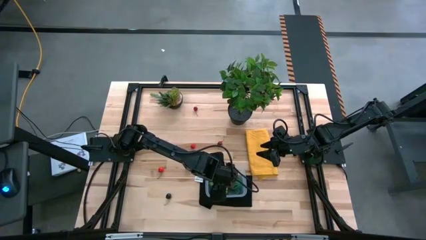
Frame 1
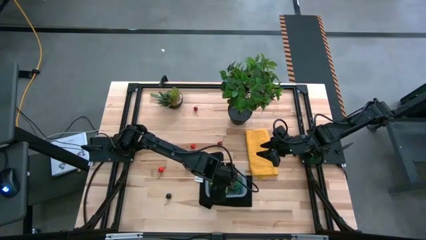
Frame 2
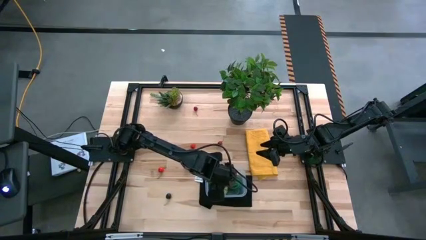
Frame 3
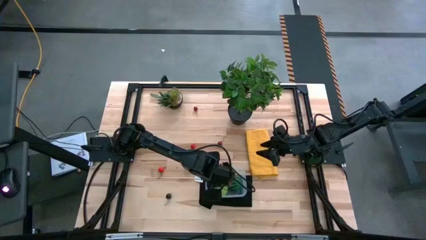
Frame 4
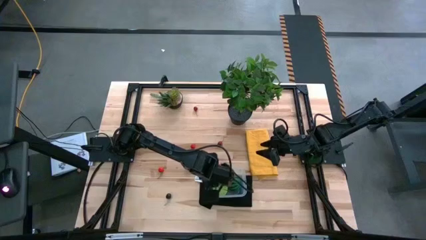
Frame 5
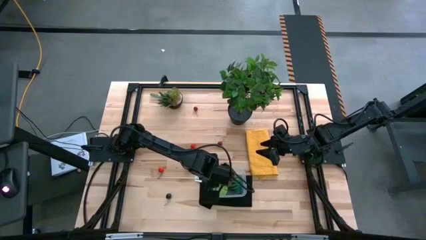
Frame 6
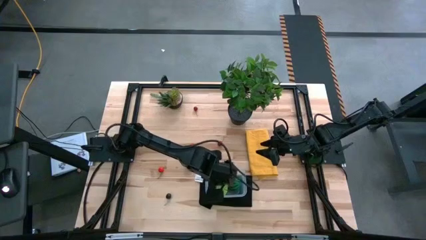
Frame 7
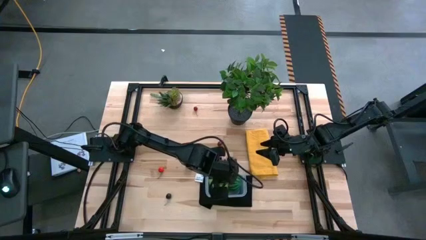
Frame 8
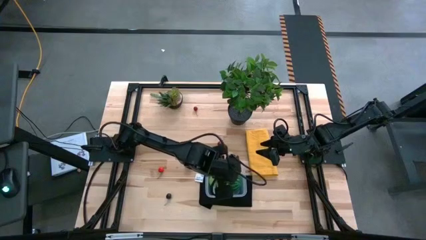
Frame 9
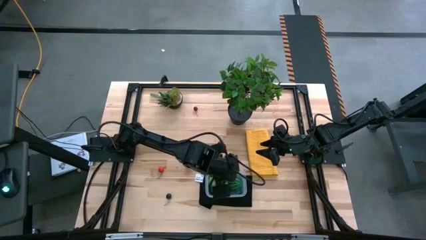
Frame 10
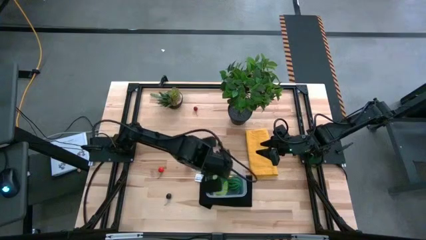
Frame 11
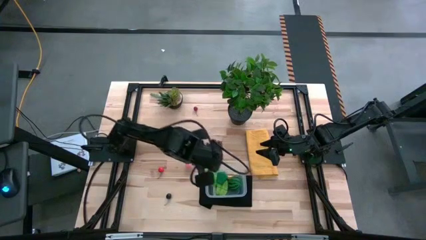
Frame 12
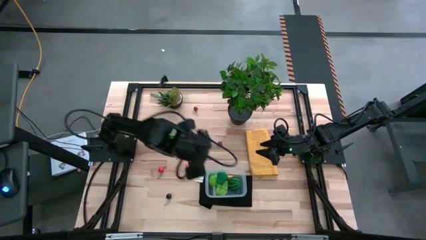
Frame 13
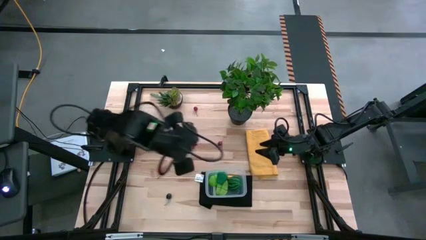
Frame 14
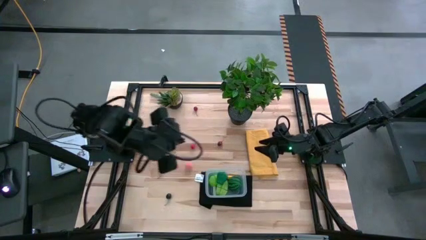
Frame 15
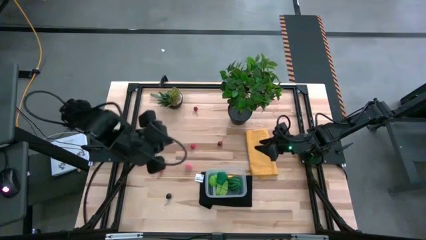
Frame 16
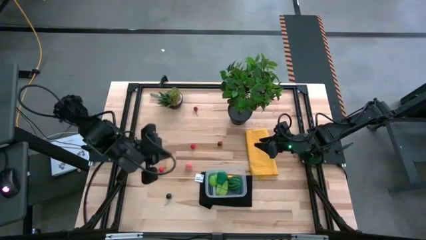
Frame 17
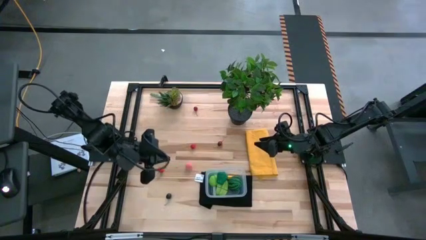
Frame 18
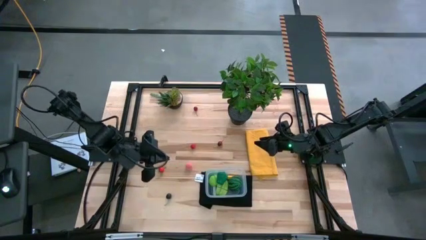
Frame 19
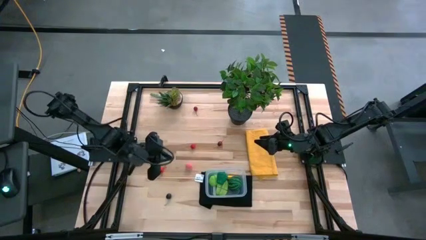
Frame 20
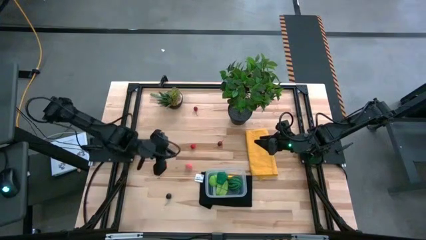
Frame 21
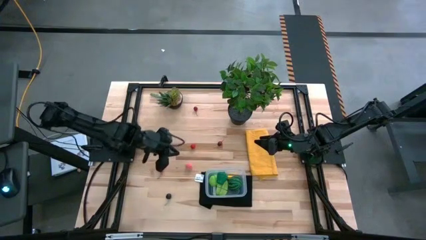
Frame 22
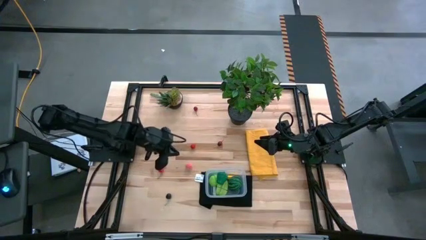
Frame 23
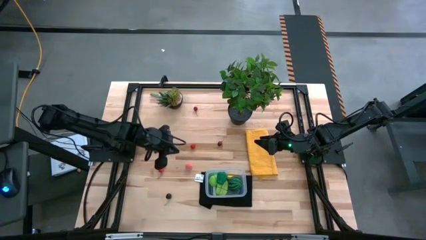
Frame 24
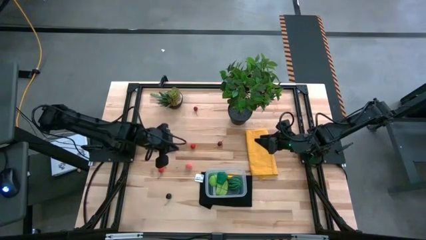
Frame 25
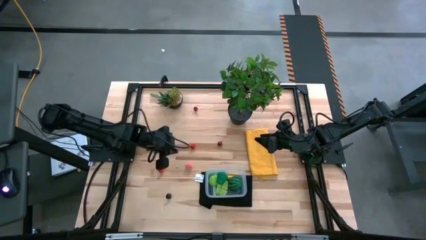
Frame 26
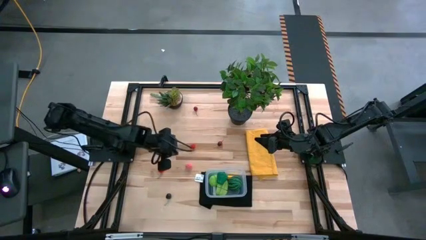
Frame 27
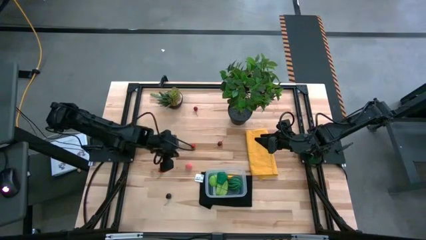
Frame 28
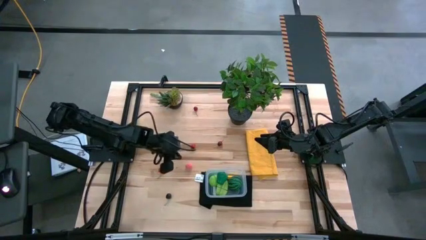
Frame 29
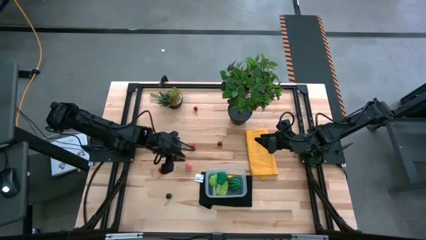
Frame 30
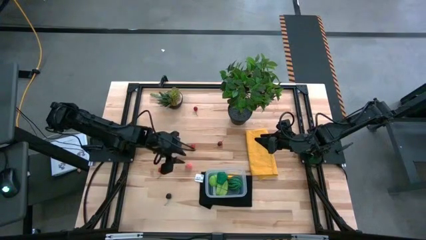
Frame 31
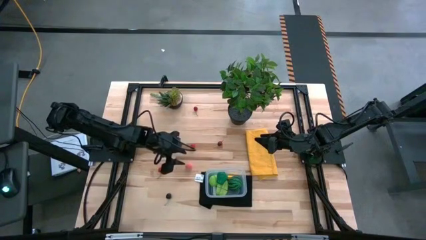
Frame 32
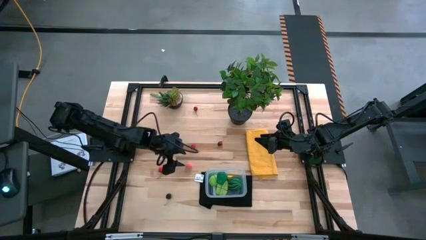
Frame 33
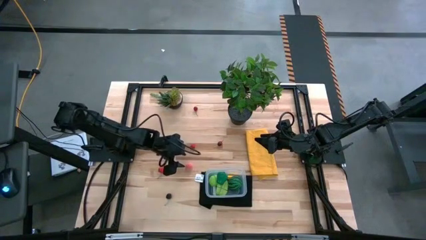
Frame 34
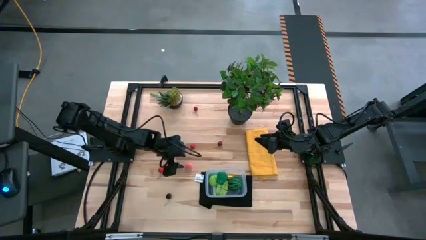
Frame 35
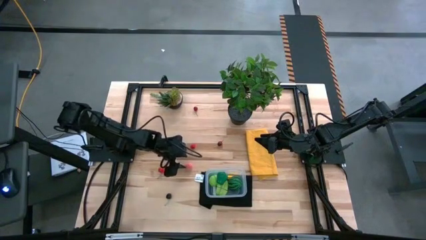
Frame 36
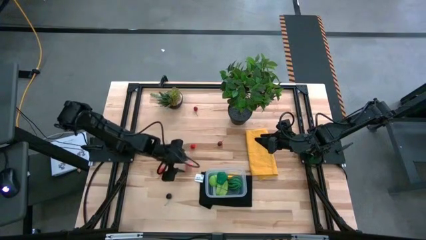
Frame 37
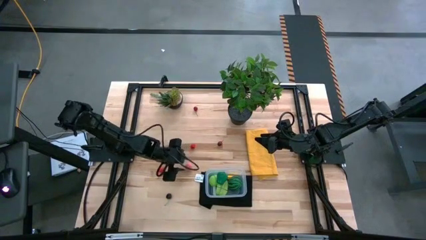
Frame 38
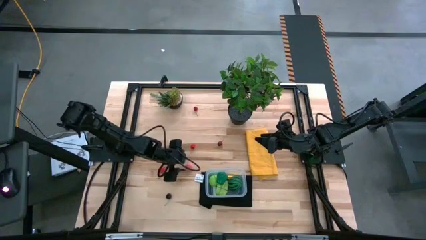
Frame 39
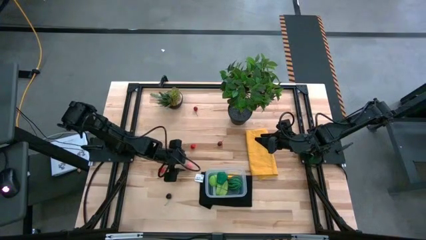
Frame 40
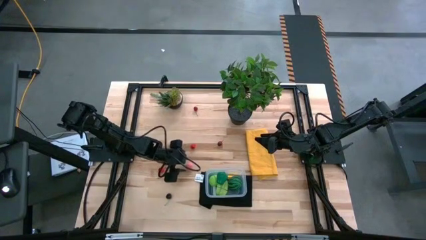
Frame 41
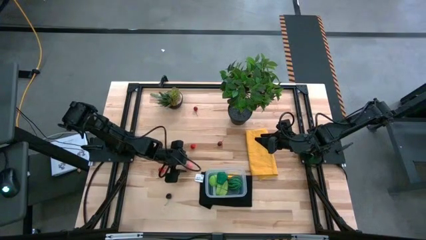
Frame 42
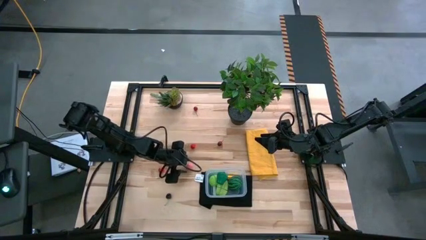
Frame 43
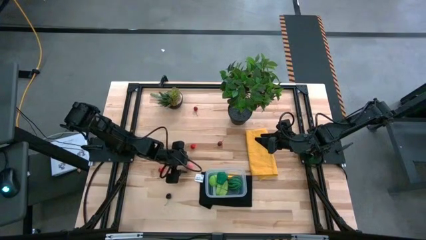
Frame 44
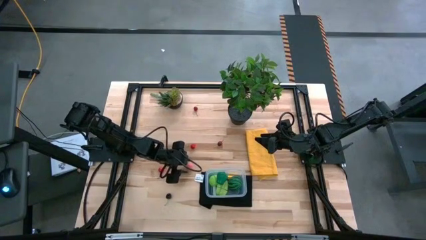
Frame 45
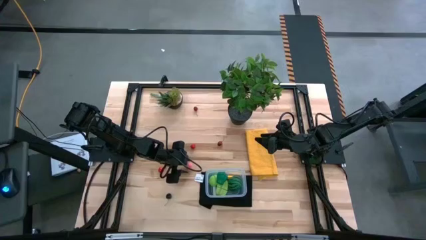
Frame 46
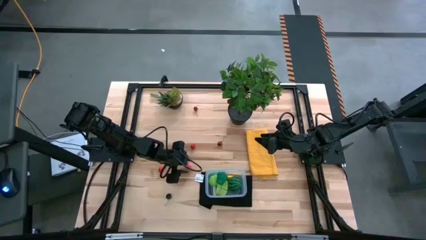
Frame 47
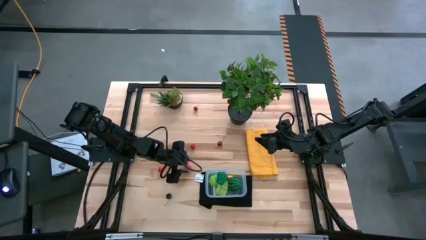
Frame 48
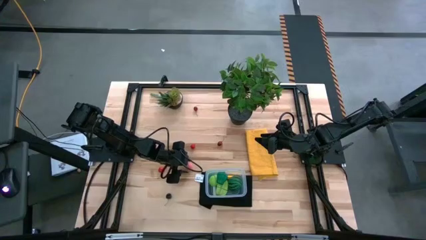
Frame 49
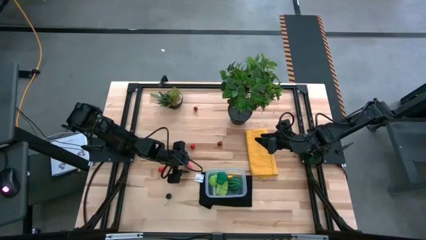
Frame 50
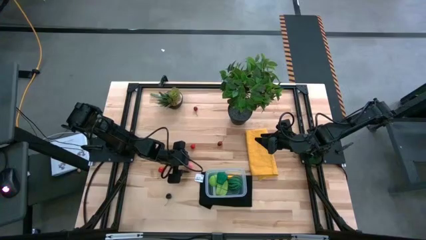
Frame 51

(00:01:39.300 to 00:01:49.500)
Task: Pick and placing Produce into tupperware
Put the peach into the transparent bin

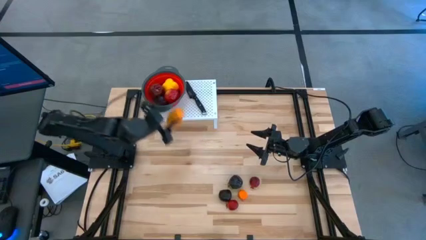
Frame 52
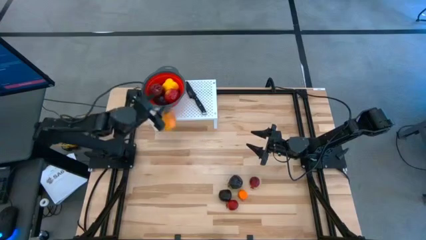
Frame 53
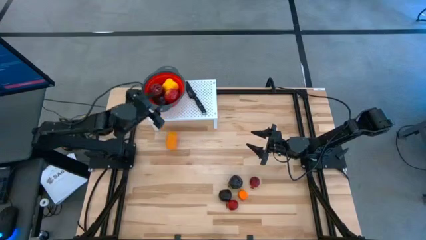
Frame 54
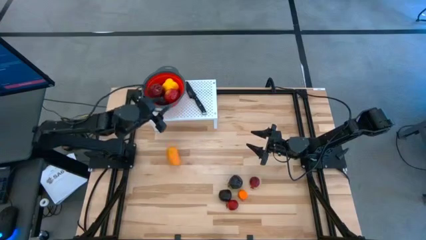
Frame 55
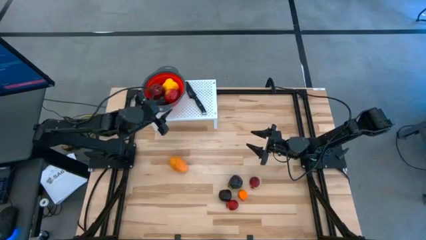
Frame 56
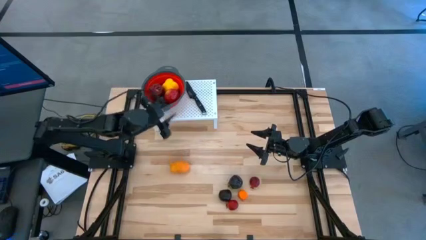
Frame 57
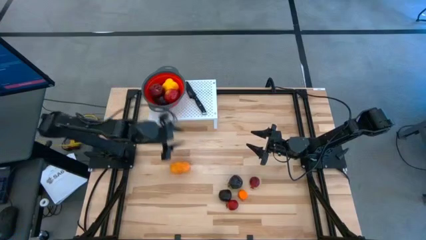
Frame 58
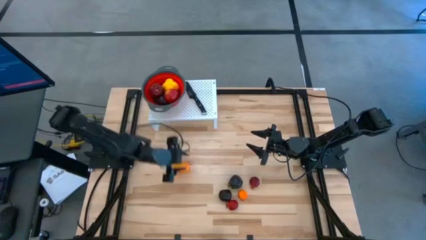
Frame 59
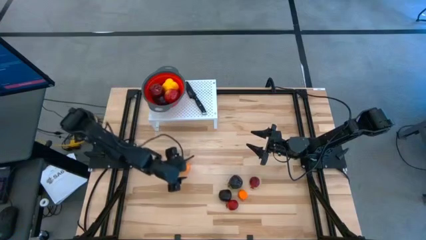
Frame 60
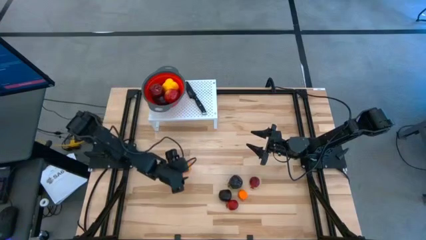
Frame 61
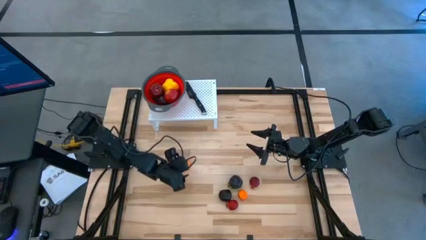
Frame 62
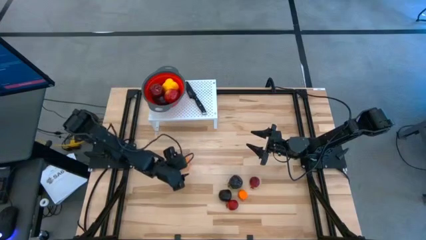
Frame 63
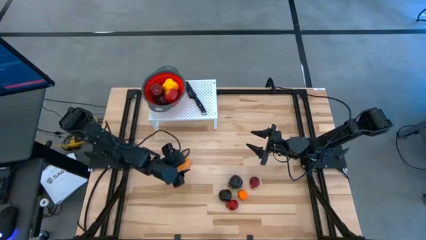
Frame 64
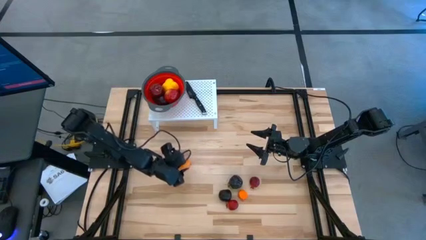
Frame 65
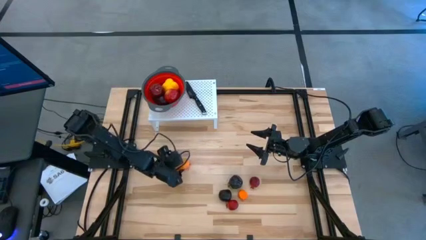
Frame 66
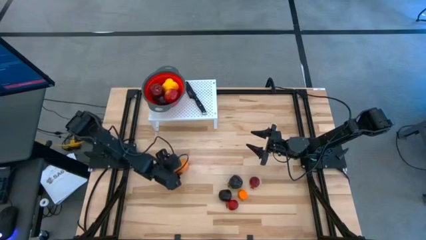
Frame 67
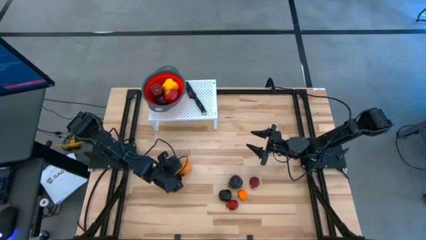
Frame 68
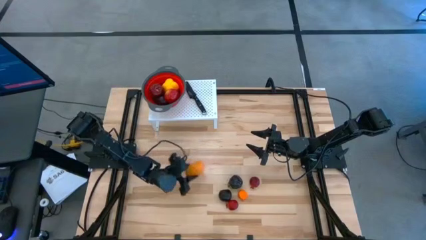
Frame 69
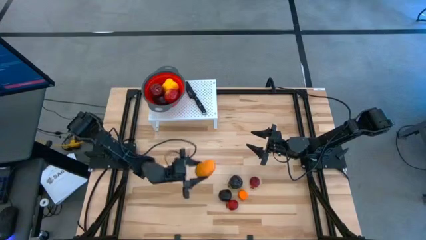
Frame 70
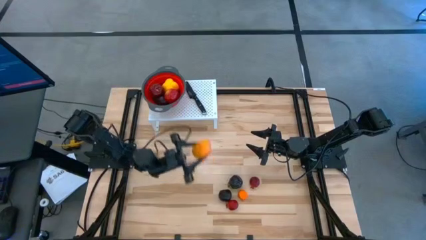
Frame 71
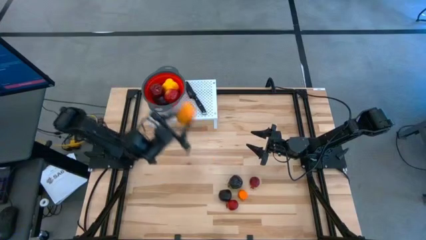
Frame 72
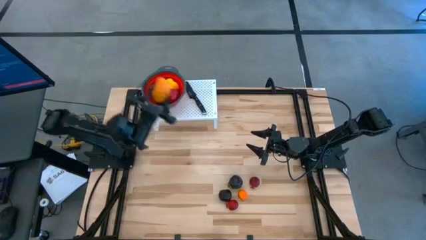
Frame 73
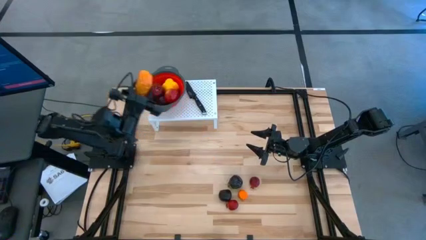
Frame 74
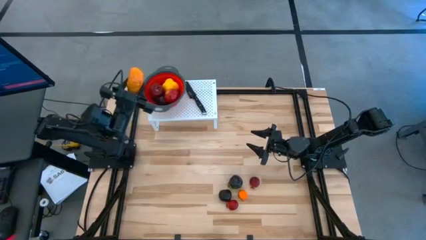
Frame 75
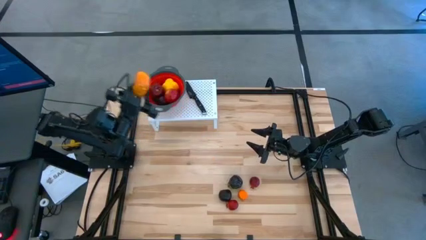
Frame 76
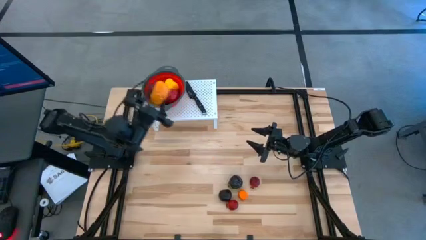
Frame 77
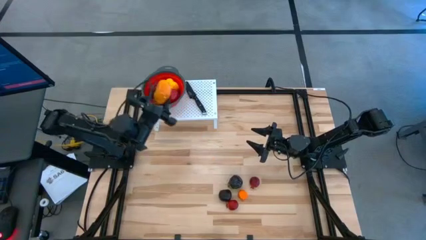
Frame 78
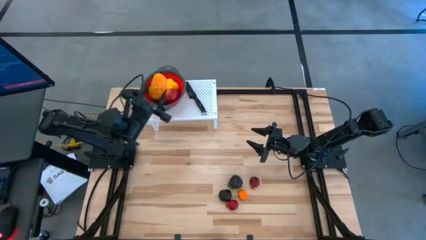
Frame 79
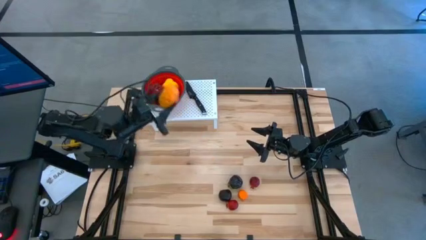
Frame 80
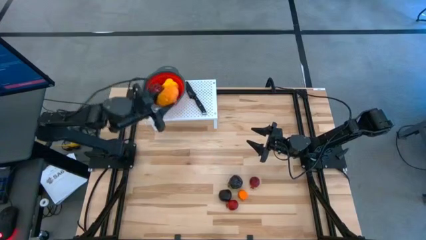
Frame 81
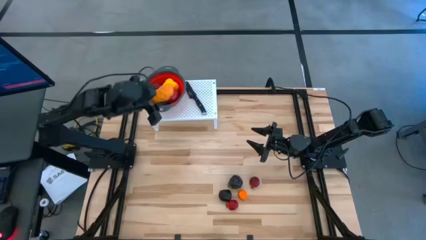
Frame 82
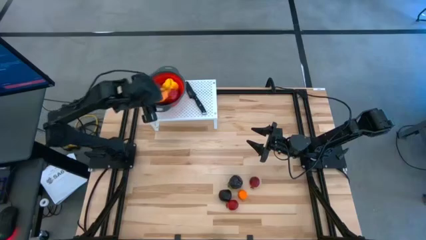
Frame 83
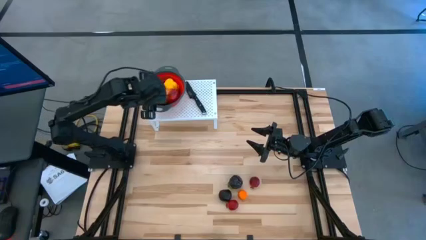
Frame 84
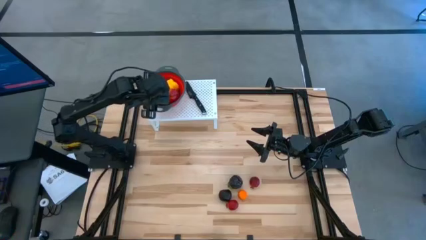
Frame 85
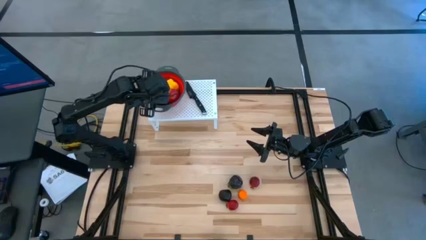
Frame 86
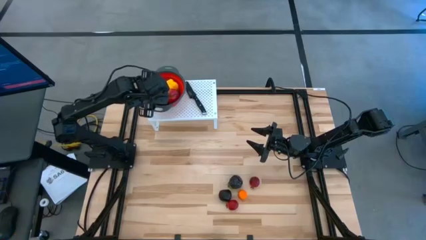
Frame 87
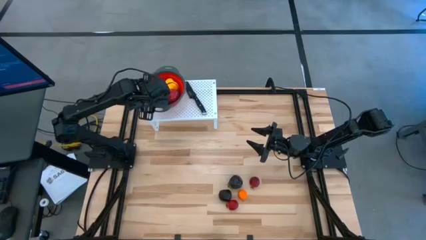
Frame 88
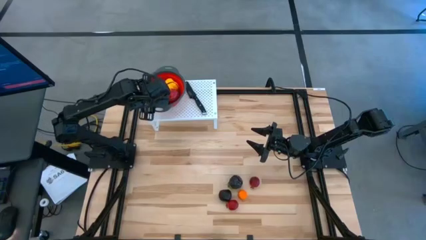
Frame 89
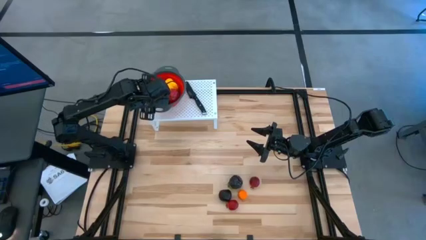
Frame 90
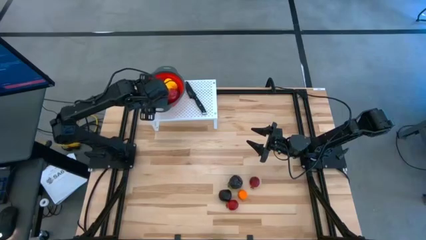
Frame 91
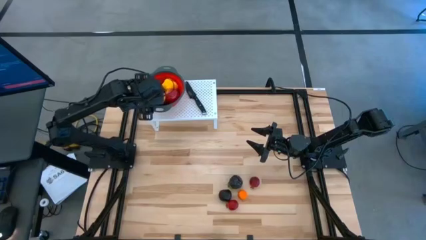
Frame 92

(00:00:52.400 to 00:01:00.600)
Task: Pick & Place Fruit
Put the yellow mango into the red strainer bowl on the shelf
